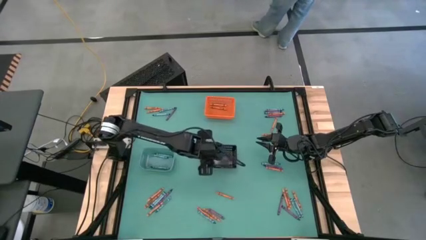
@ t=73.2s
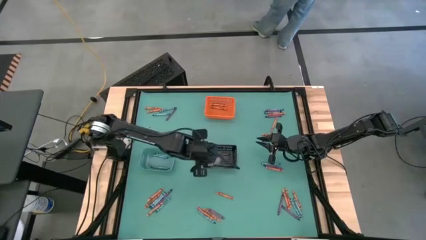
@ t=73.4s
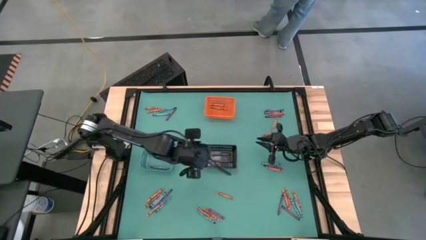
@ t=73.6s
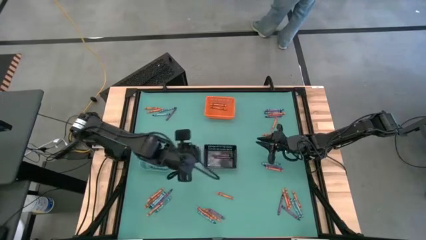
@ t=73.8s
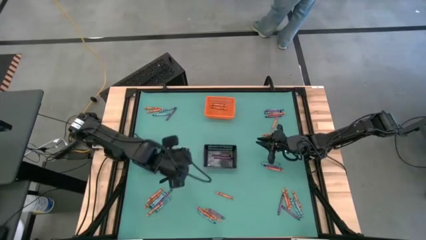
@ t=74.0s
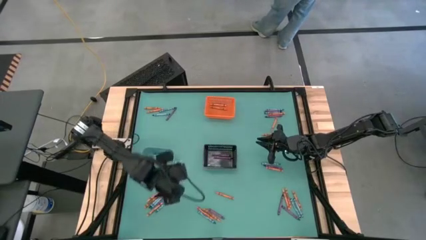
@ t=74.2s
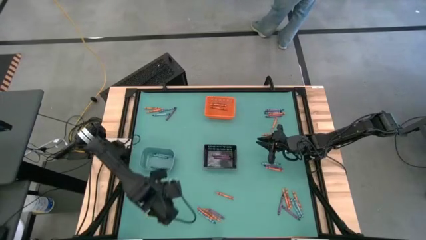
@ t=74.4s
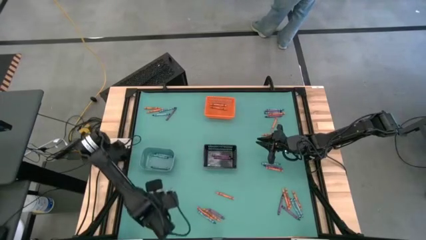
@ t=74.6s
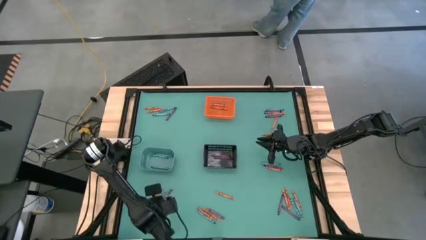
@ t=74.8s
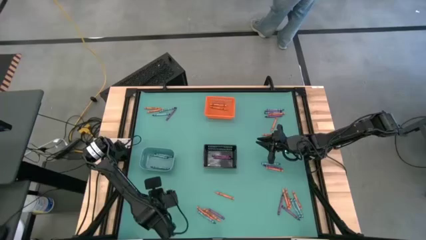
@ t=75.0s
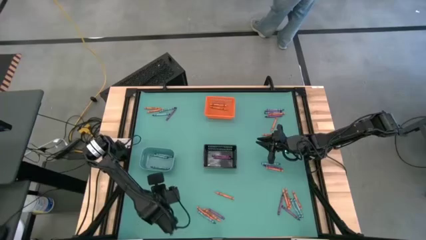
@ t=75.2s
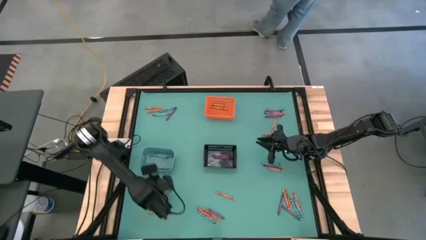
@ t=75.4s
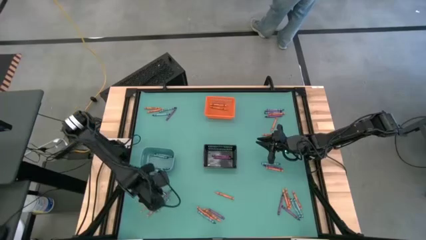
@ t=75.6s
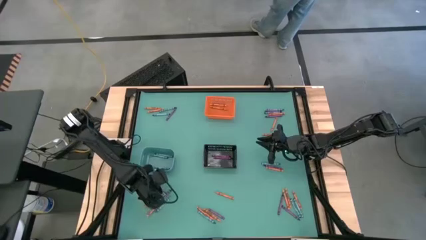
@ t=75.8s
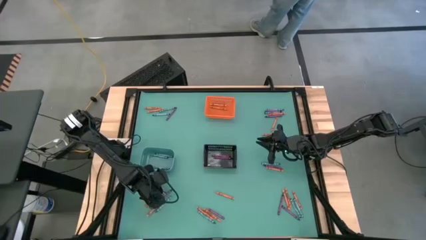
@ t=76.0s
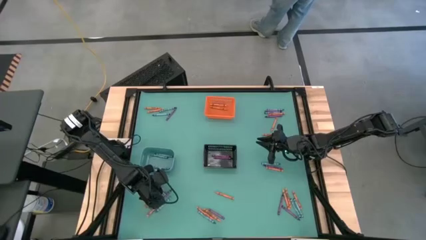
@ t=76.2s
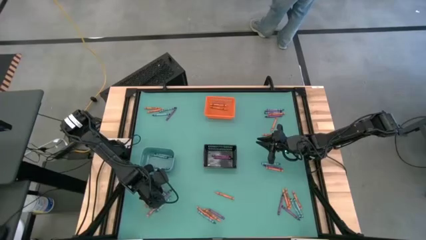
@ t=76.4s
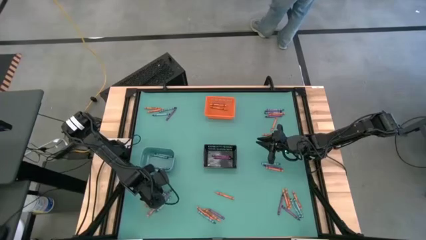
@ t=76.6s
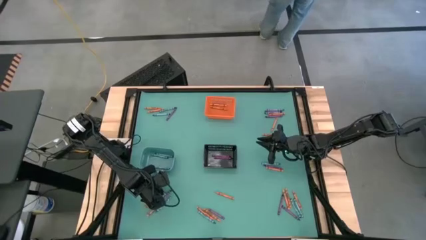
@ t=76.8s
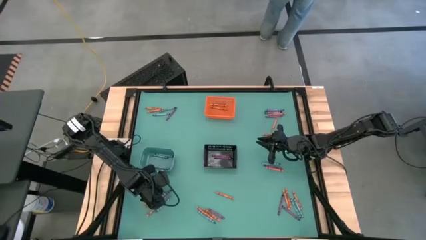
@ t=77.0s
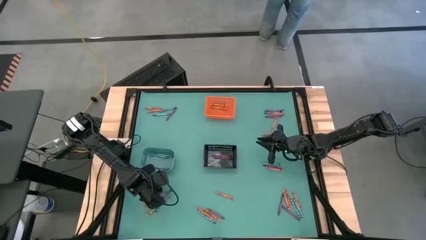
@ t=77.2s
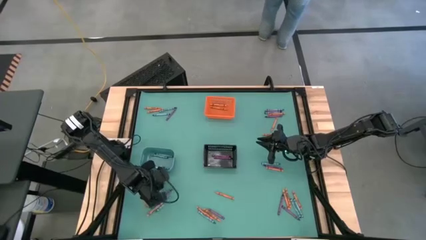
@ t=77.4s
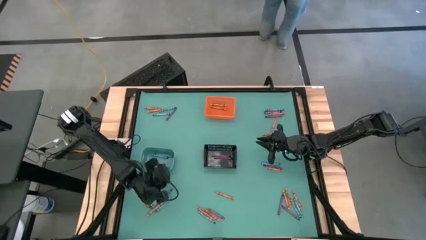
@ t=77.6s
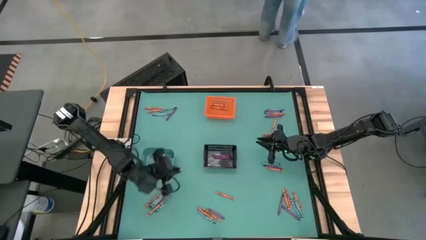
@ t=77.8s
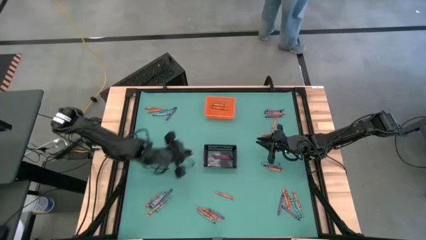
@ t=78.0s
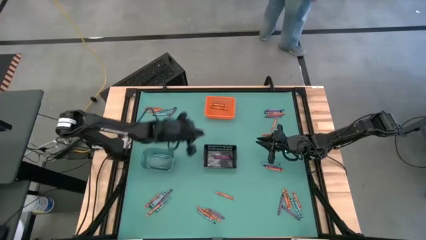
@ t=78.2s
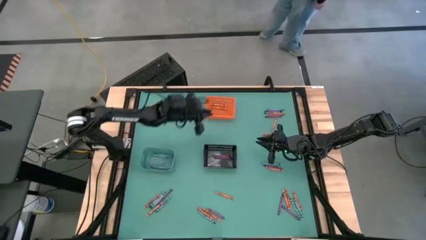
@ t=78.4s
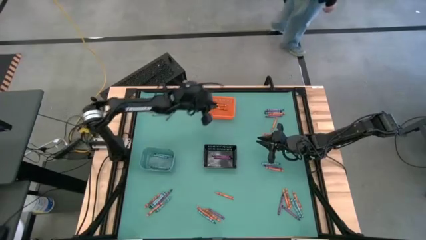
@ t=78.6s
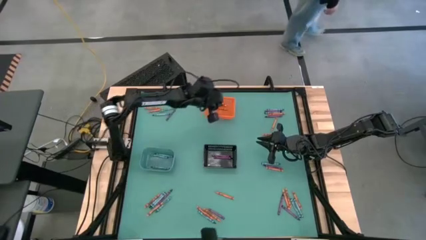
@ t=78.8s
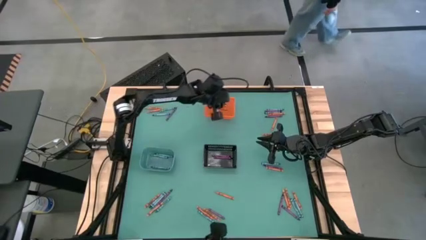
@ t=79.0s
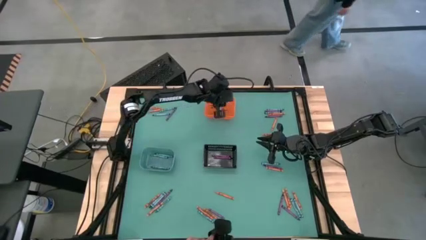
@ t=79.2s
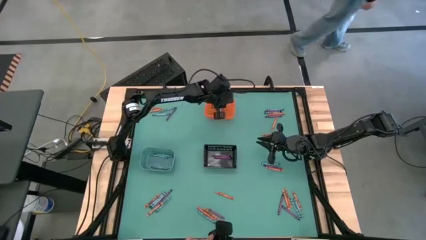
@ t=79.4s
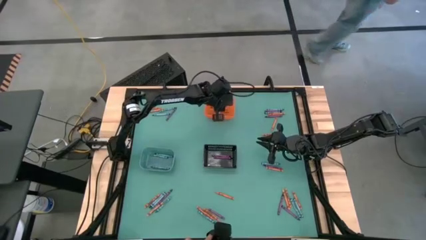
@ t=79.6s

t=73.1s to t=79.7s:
Task: Sort crayons
Put the orange crayon into the orange bin

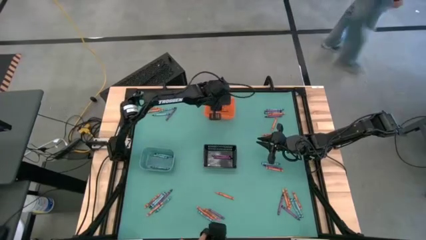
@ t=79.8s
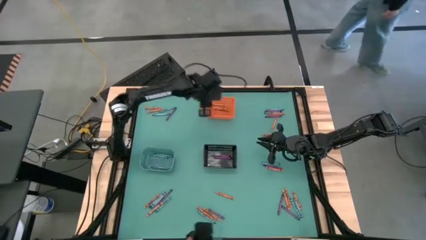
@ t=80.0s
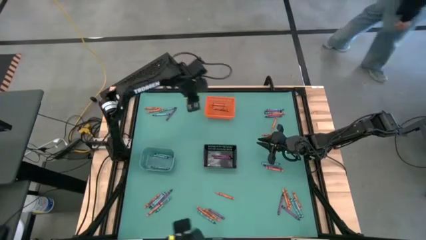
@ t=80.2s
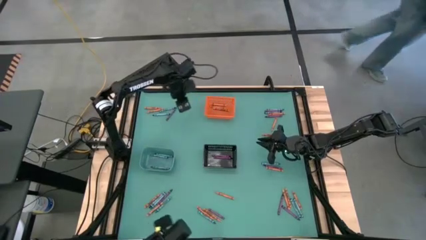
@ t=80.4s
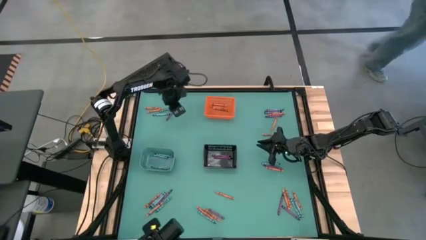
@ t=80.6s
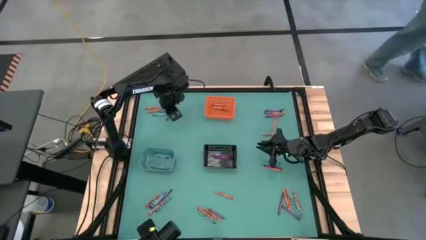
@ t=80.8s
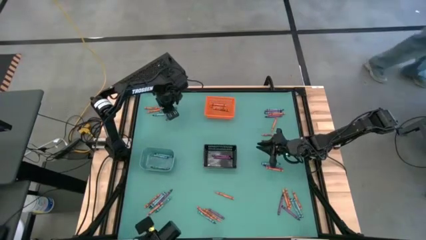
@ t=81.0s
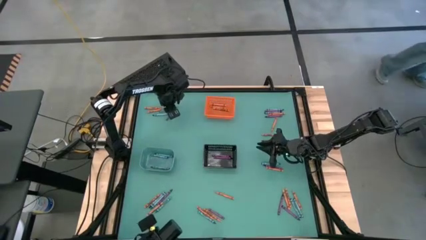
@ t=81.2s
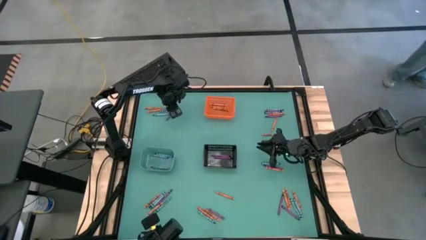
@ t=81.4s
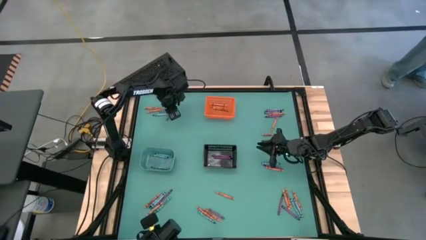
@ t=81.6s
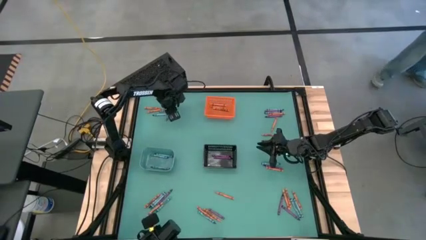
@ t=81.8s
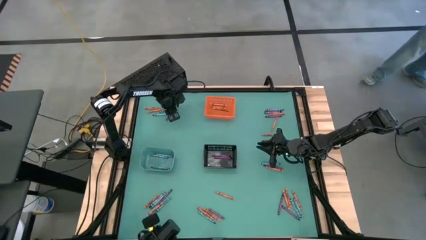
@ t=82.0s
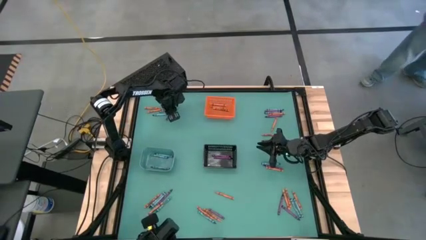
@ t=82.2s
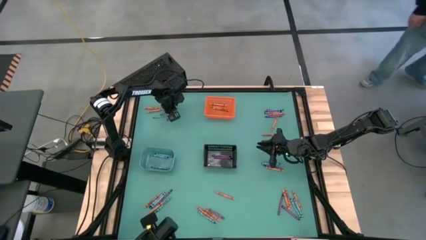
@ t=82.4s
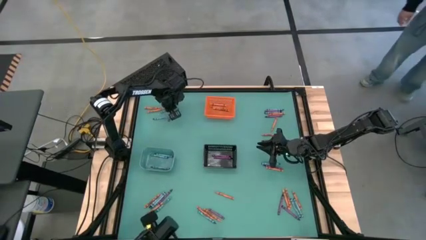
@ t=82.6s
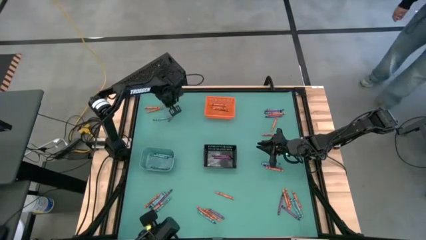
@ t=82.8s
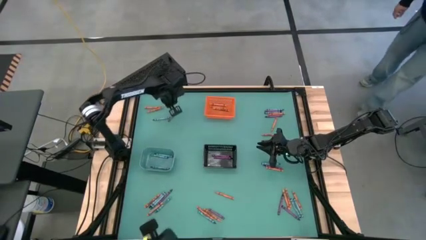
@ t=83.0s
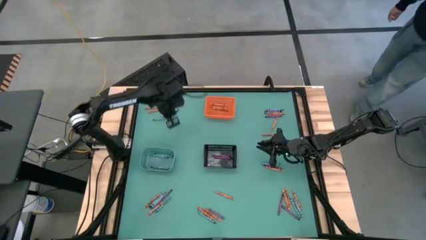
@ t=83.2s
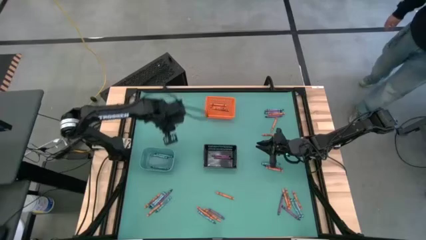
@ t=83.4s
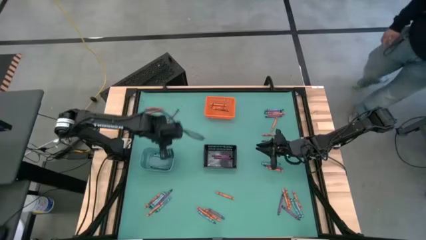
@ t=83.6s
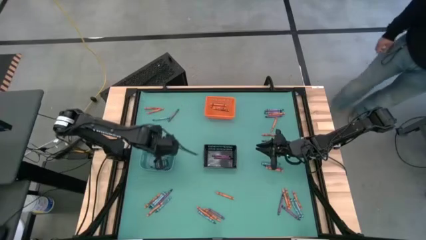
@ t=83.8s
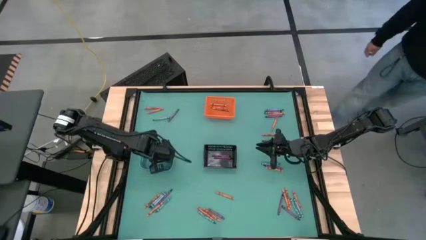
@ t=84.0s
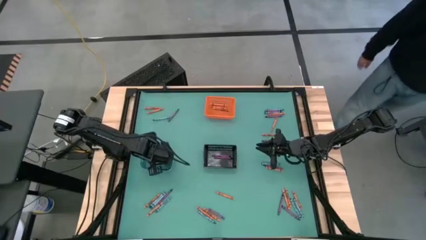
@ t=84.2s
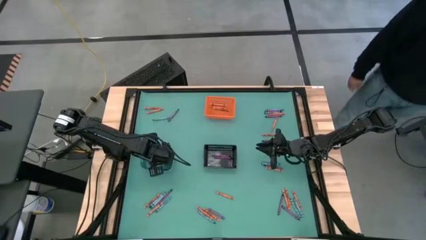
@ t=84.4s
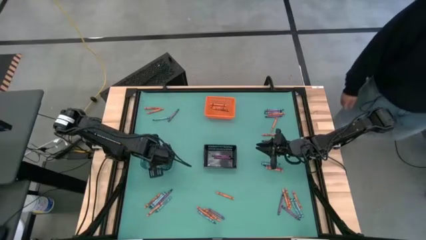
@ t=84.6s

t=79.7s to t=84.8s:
Put the blue crayon into the light blue bin

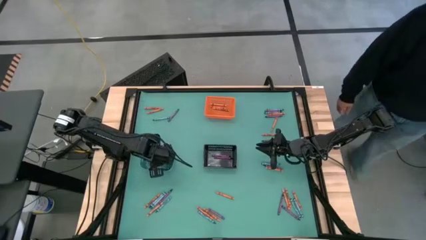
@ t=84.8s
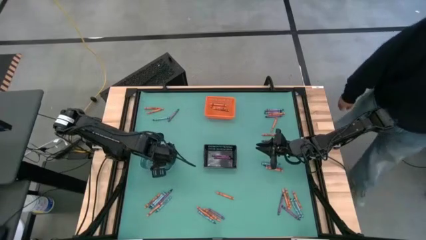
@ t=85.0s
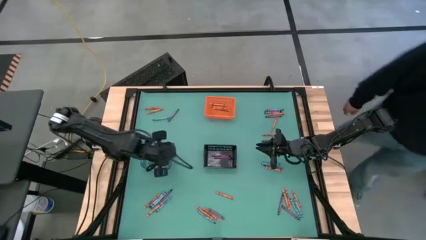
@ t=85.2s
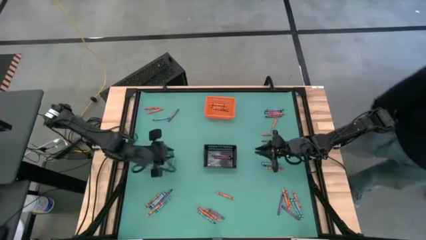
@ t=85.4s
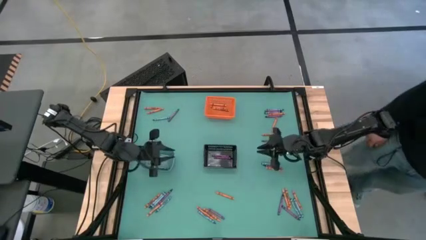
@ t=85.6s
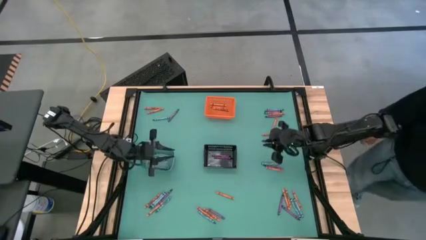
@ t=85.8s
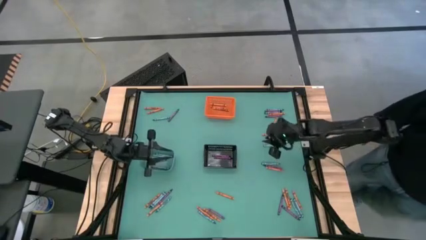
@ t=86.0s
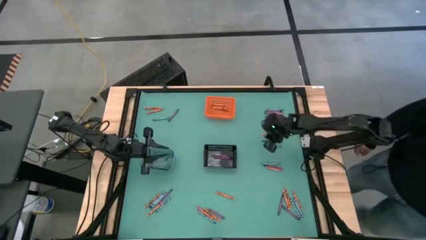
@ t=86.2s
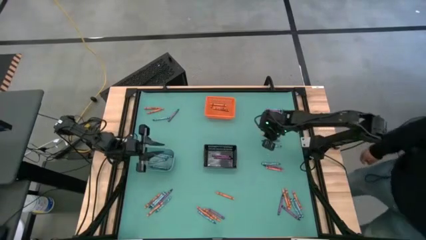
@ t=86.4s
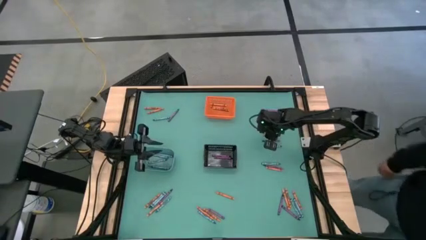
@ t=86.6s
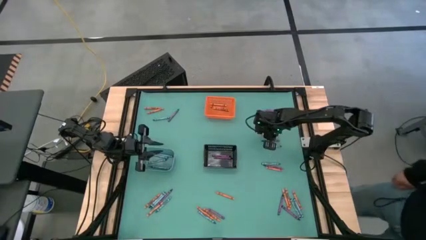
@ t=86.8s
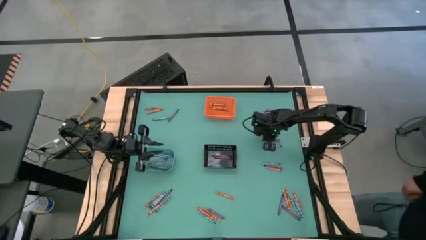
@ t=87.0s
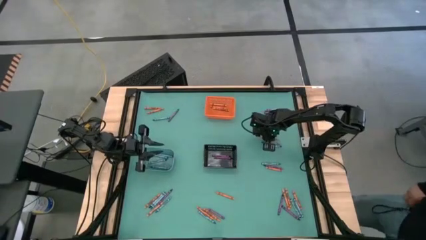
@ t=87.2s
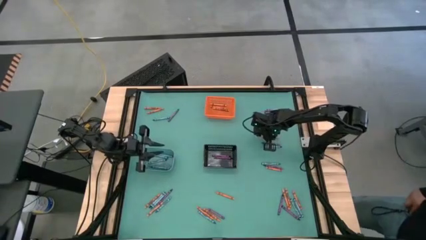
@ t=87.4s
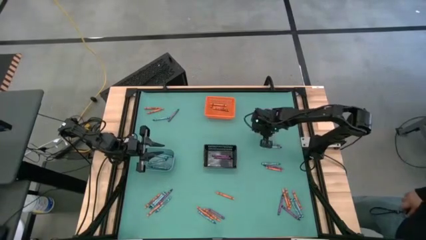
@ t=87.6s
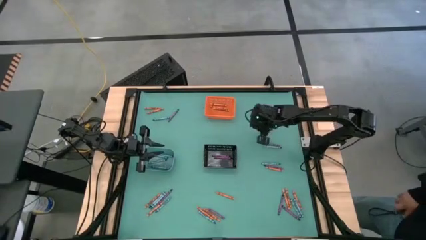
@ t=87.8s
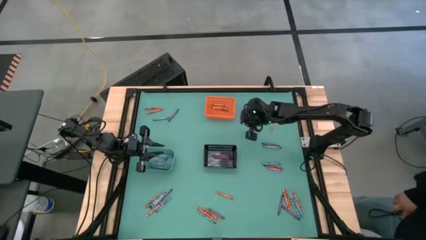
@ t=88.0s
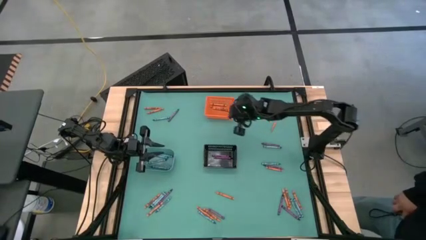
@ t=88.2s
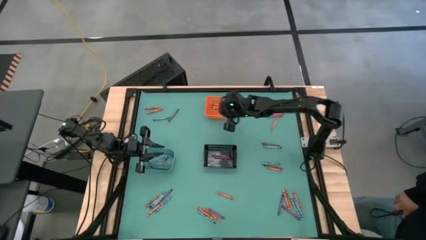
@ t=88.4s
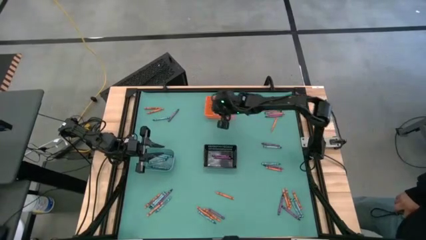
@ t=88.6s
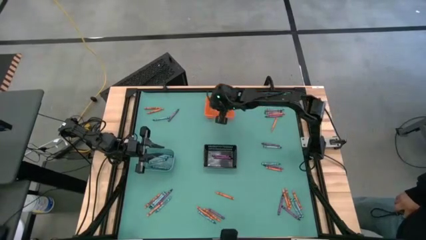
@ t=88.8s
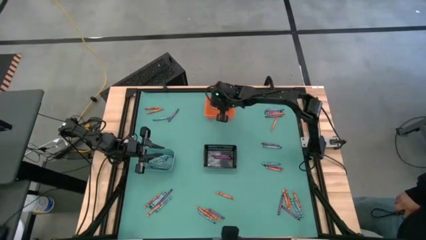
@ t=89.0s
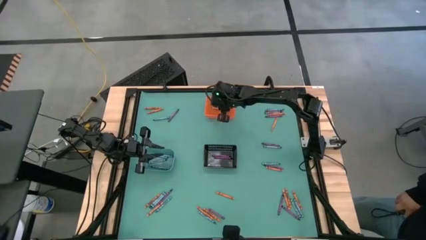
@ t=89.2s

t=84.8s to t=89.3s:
Put the orange crayon into the orange bin
